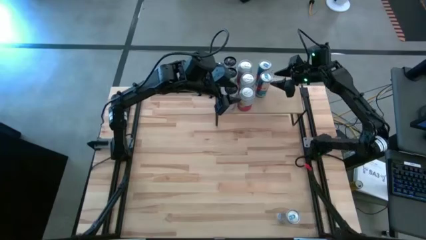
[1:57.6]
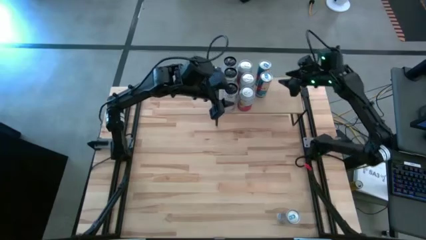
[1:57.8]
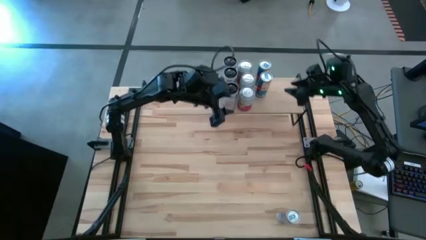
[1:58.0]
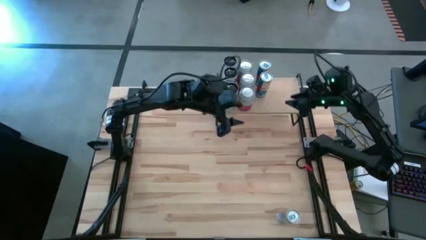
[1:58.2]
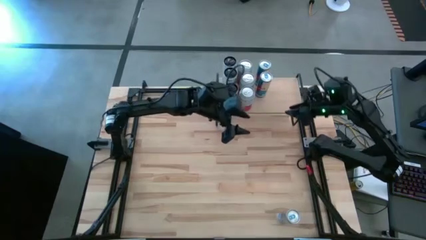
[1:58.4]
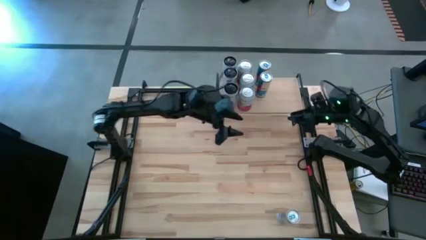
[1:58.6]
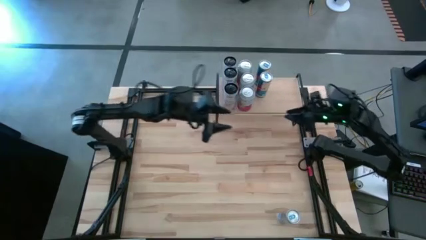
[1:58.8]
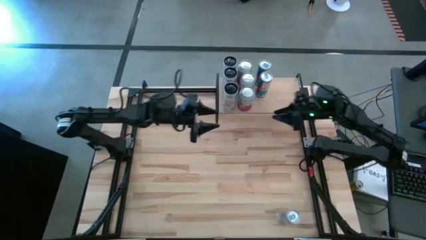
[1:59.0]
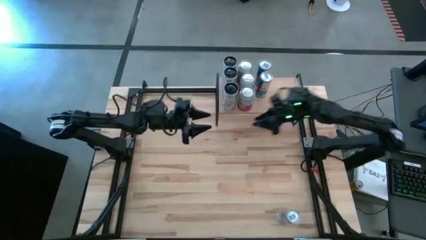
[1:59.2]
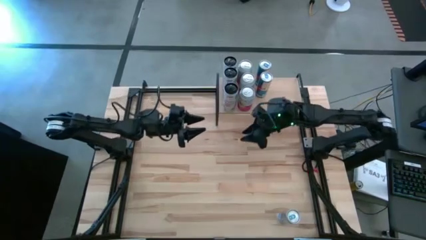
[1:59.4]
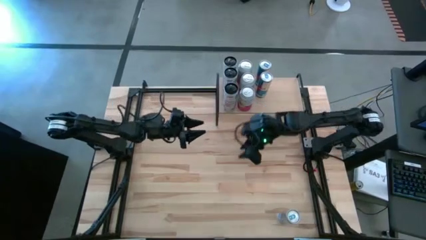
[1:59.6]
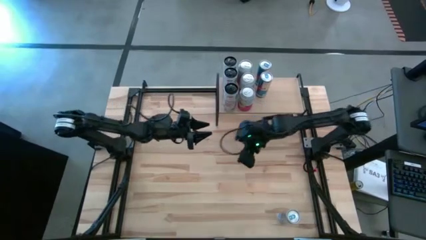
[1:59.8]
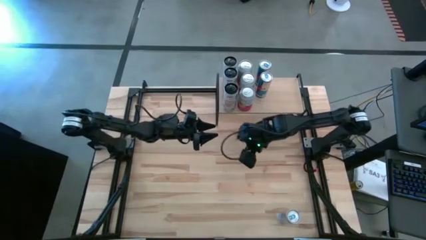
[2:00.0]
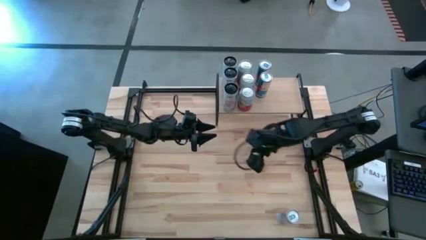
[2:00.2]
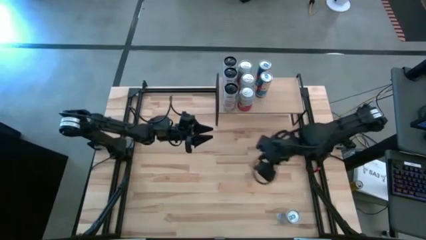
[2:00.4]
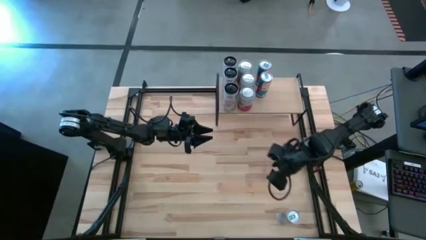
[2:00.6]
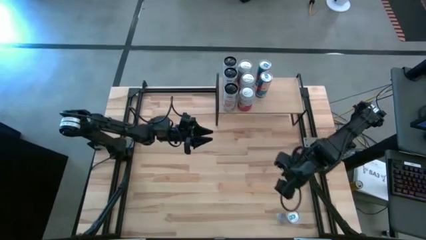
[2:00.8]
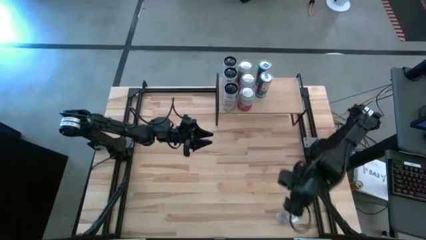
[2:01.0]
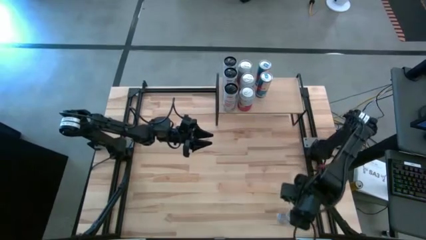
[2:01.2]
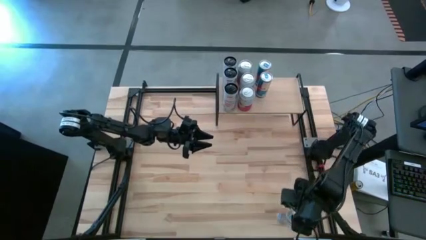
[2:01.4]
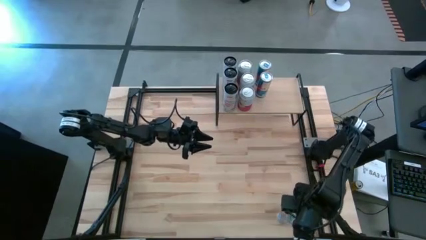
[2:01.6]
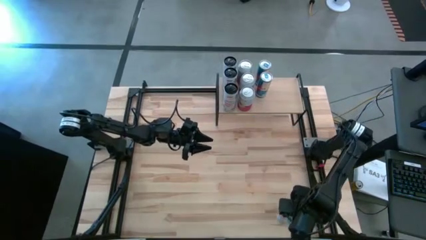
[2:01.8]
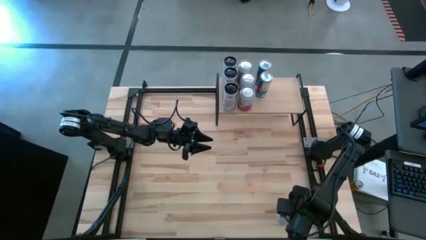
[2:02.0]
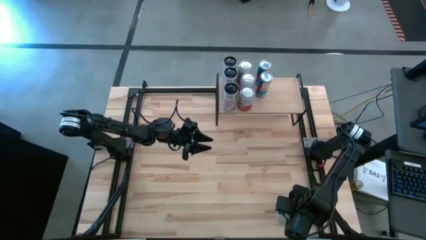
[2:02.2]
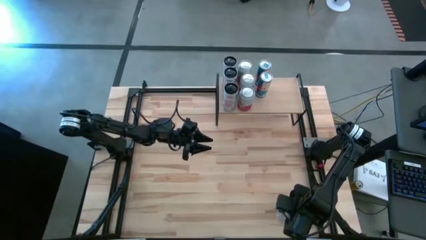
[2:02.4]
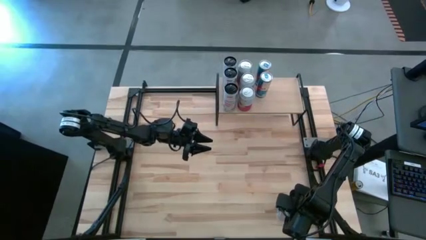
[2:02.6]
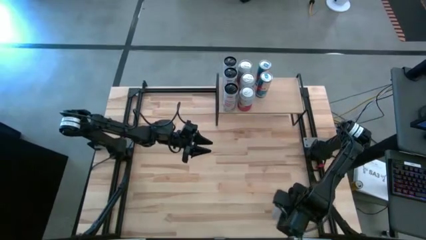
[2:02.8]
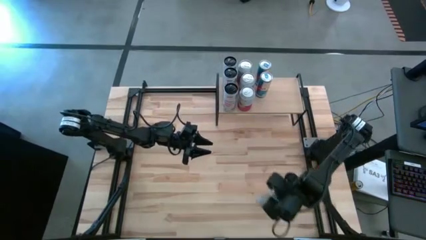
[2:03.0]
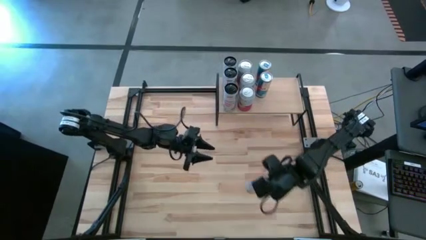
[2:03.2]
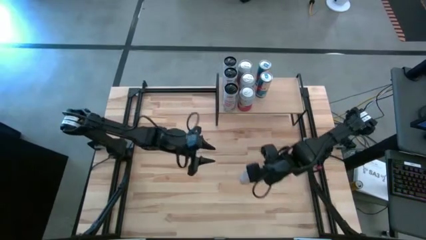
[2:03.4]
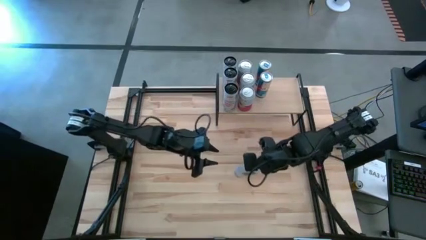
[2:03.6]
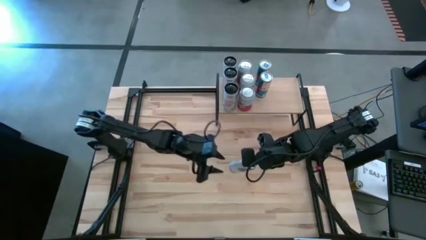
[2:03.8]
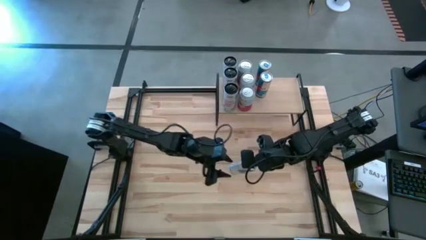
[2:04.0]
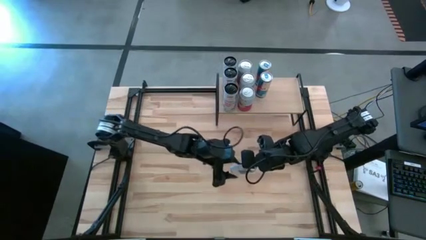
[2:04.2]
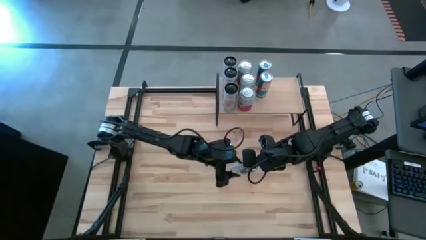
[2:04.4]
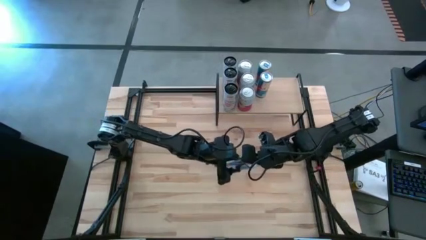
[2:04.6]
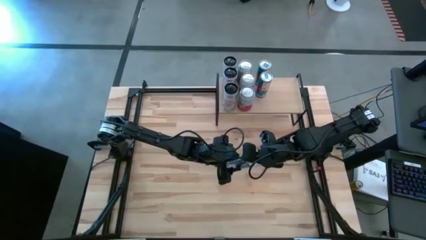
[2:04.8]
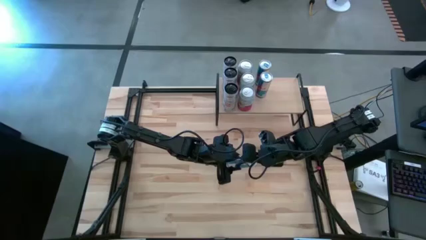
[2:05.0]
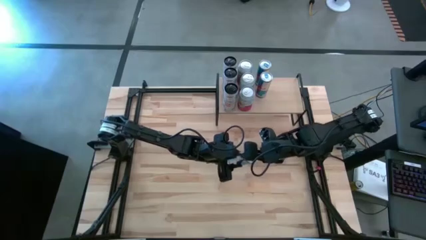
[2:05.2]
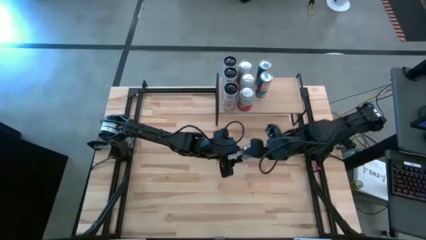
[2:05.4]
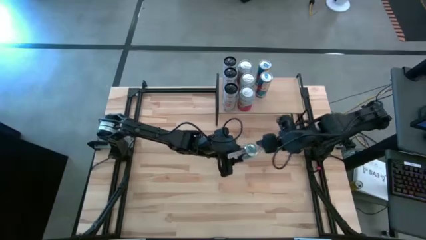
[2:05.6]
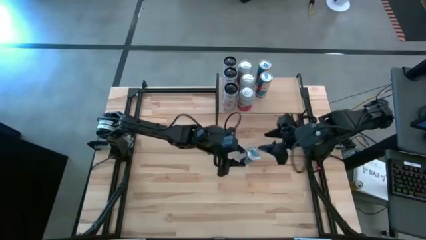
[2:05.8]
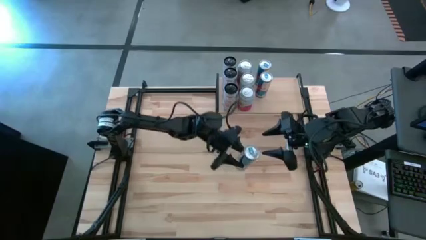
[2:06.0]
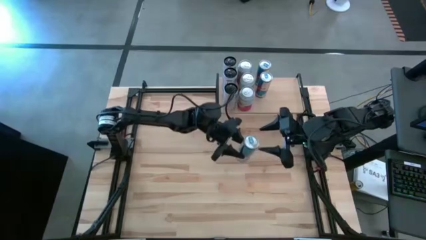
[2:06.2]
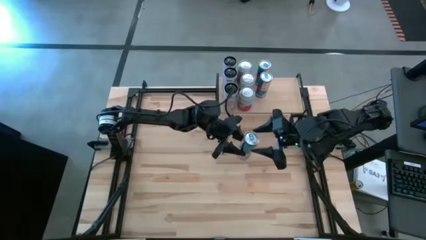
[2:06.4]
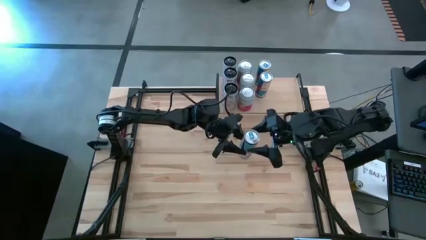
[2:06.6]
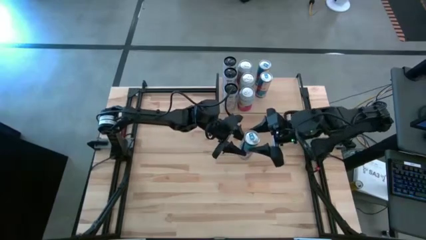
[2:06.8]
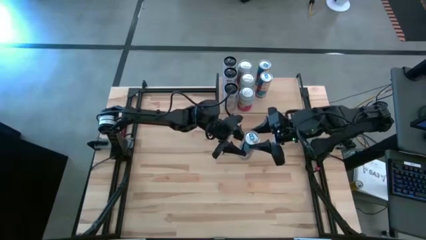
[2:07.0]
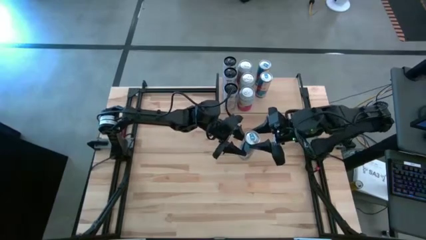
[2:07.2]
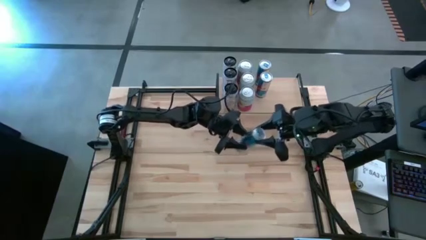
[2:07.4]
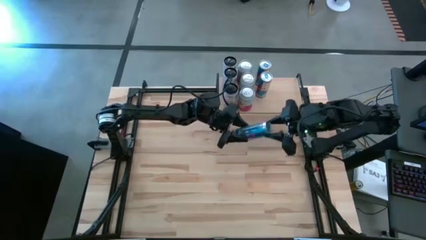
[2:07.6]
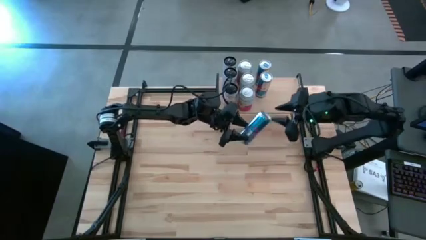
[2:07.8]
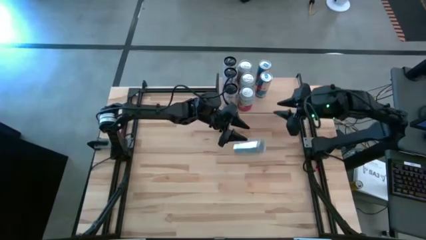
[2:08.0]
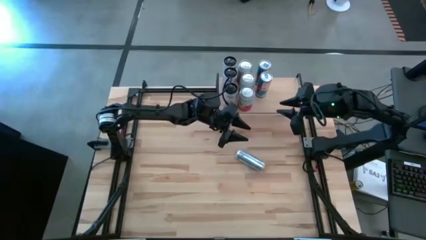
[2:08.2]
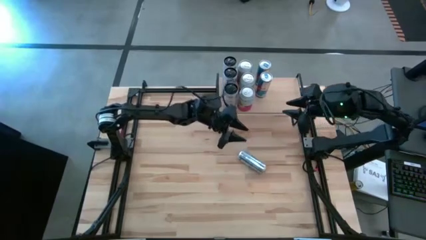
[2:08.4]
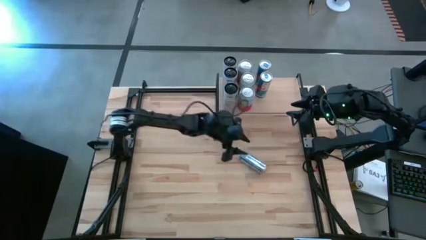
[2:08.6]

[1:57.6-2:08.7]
Task: Place canned beverage on shelf
Put the blue soda can on the shelf

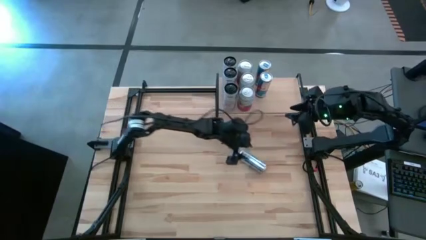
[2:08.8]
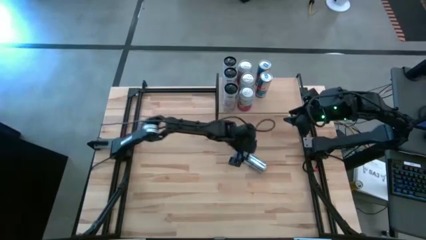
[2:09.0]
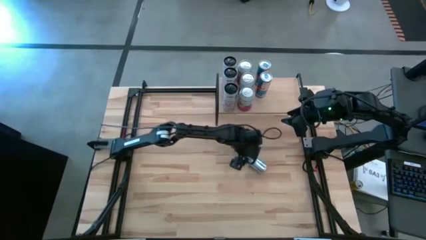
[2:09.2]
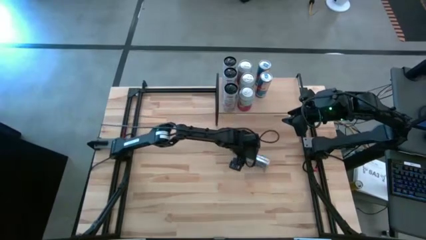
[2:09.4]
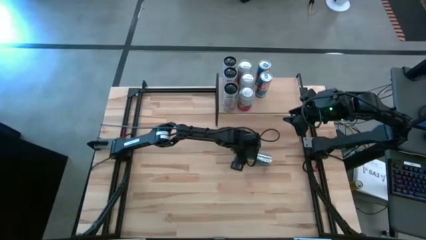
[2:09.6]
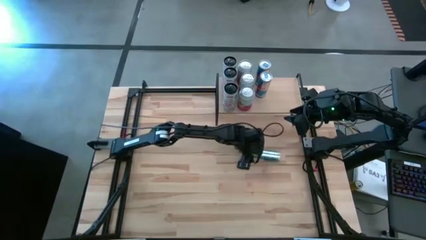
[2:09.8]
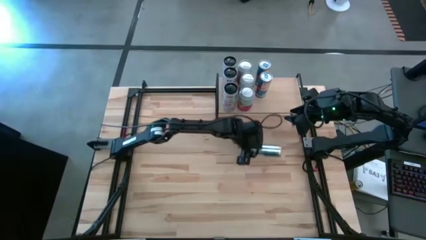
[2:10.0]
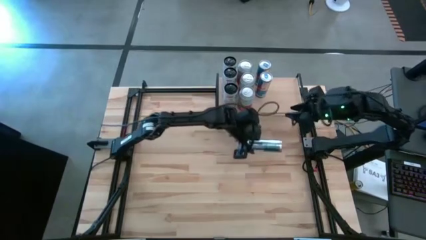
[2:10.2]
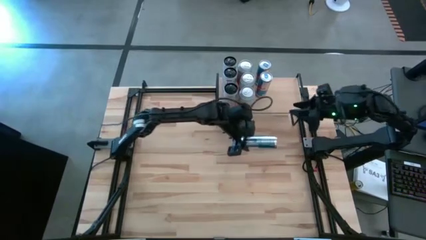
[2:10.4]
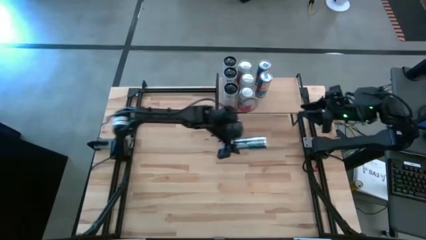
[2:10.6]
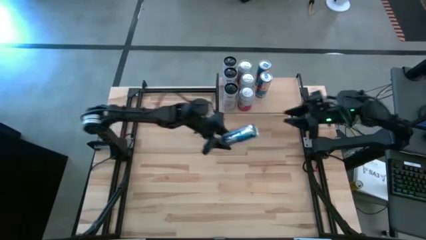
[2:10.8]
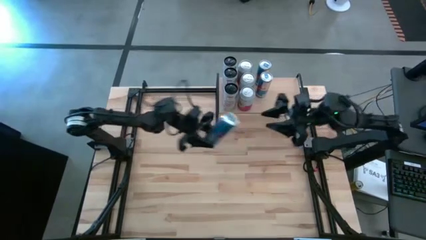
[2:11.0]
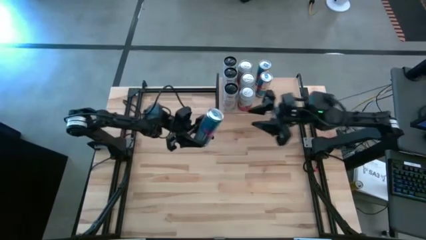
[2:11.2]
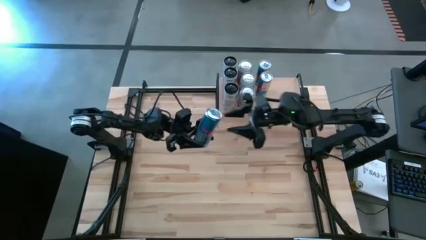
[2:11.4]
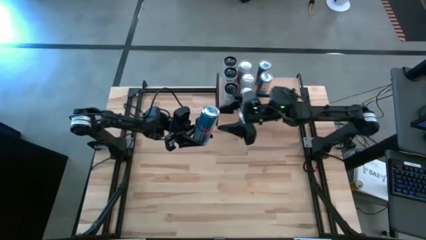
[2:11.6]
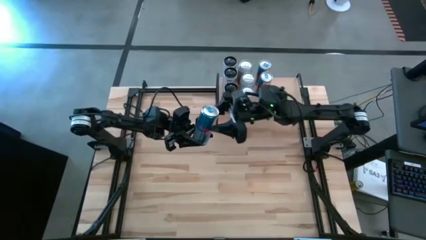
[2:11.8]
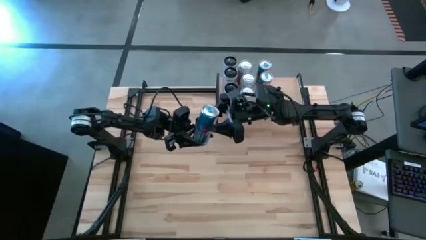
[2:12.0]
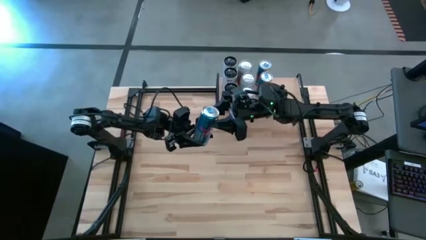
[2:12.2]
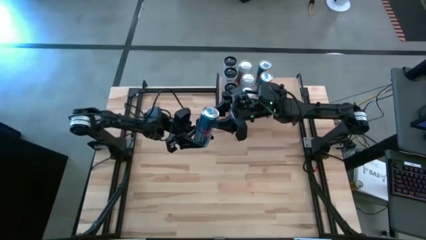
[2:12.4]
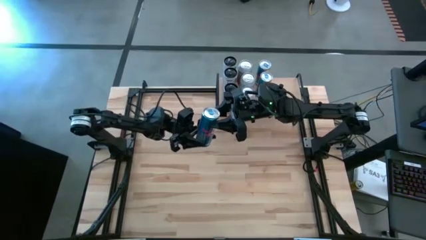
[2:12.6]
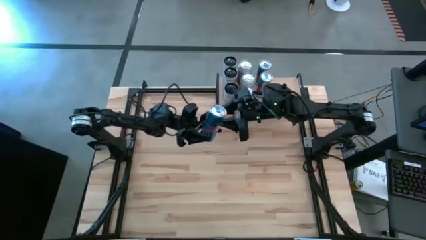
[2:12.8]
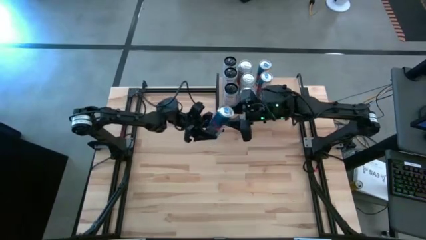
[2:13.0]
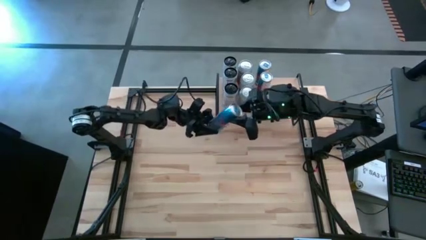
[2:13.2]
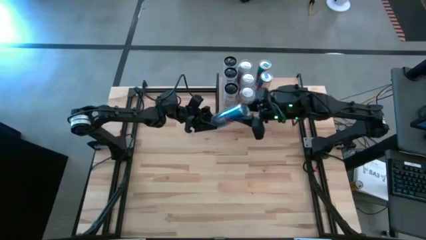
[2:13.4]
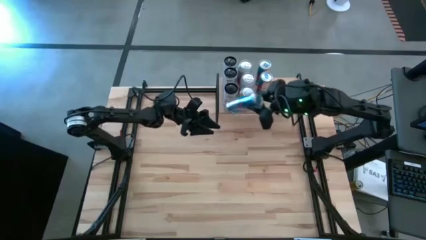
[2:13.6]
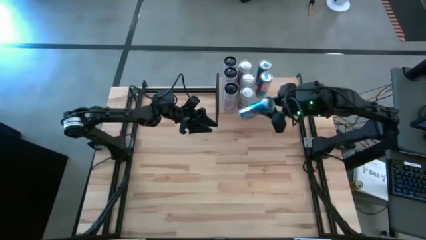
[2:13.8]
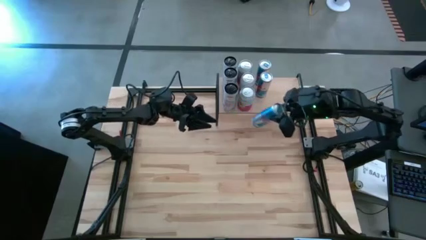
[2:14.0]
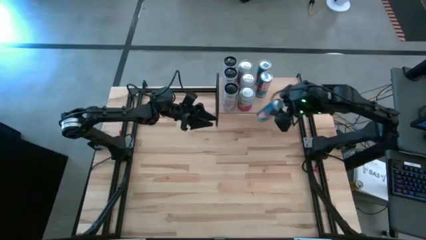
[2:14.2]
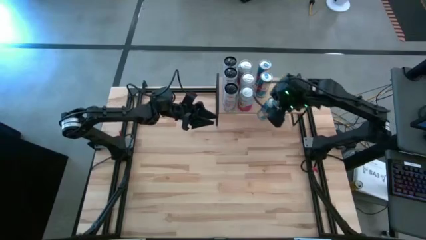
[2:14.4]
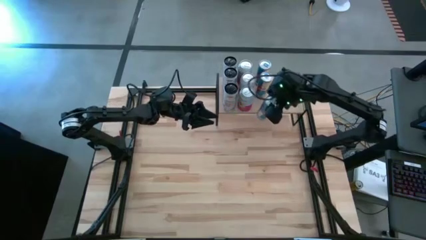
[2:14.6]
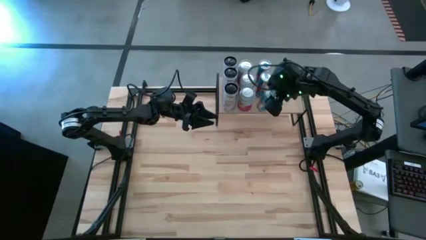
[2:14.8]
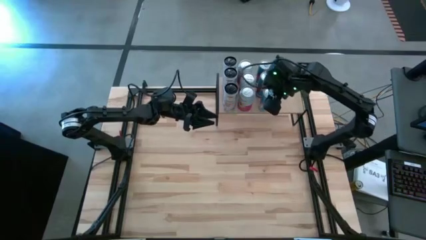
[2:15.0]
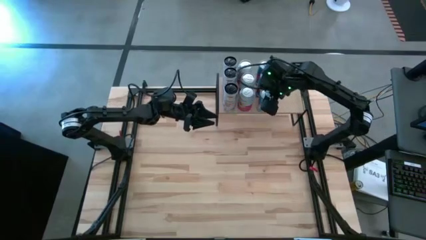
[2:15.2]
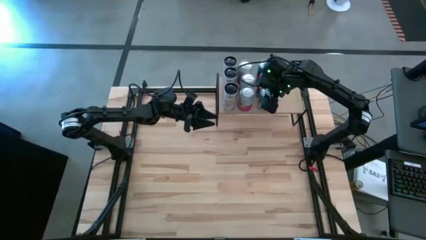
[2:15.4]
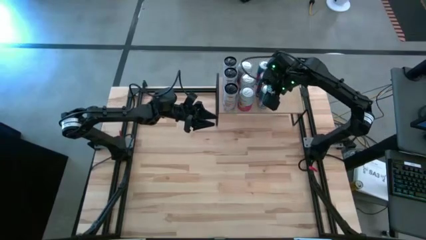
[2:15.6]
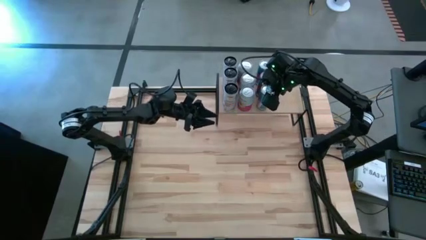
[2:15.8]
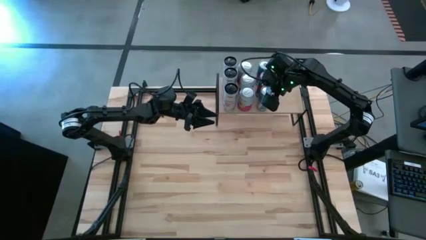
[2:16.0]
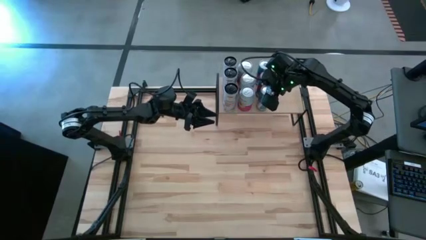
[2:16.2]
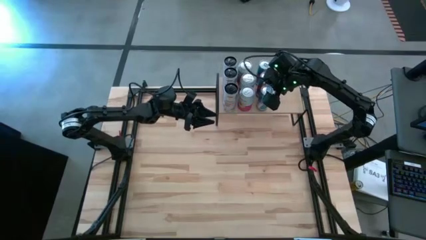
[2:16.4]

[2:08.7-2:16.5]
Put the blue soda can aligned with the other blue soda can on the shelf
